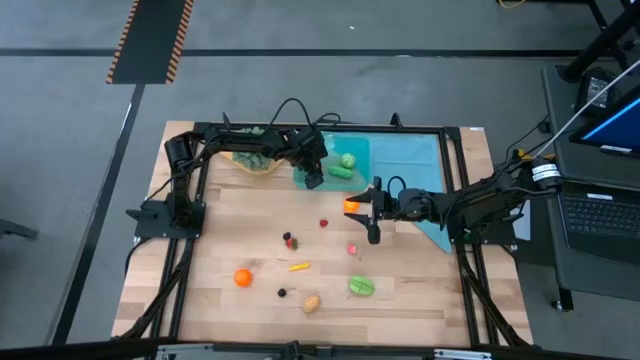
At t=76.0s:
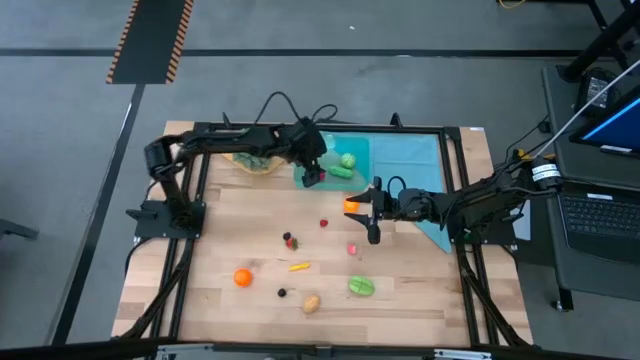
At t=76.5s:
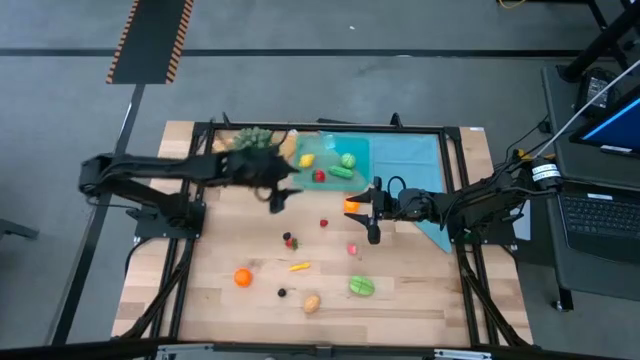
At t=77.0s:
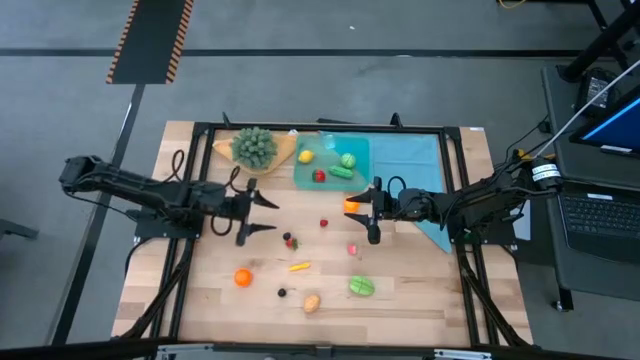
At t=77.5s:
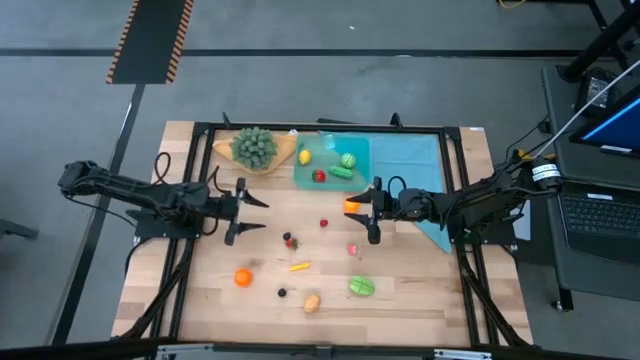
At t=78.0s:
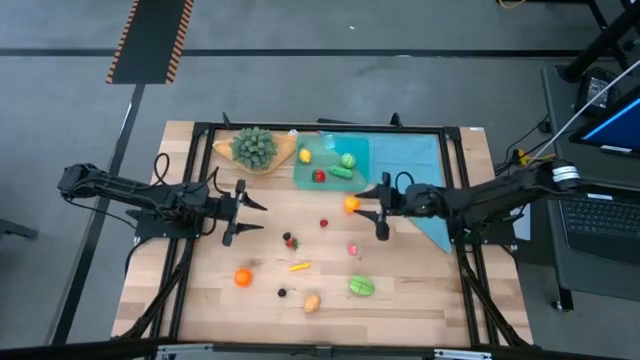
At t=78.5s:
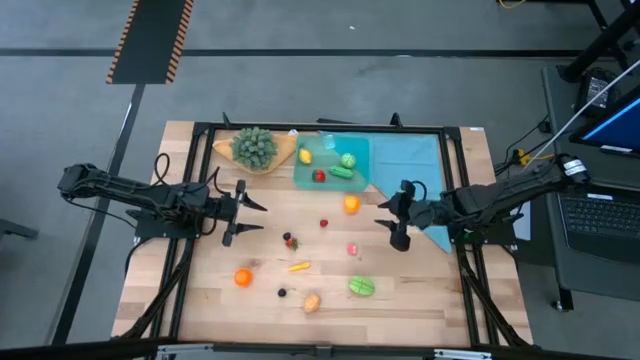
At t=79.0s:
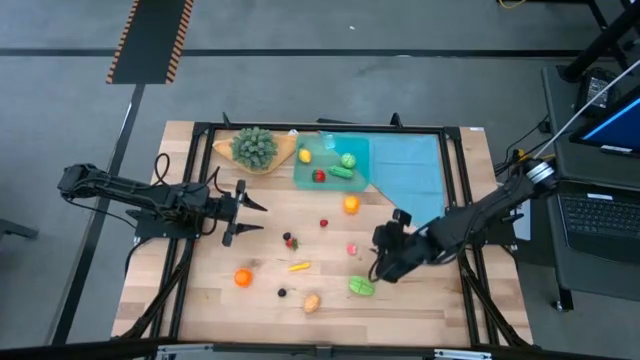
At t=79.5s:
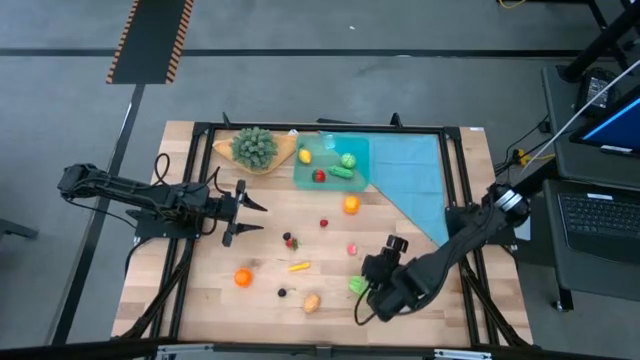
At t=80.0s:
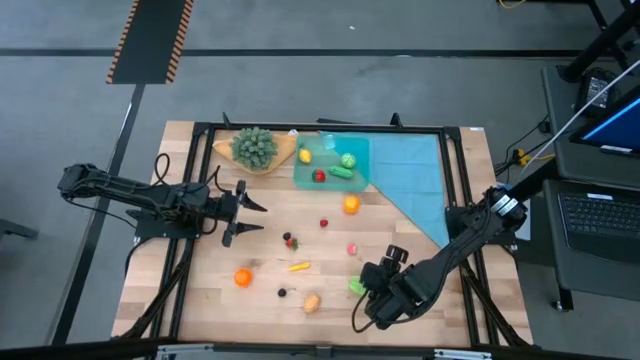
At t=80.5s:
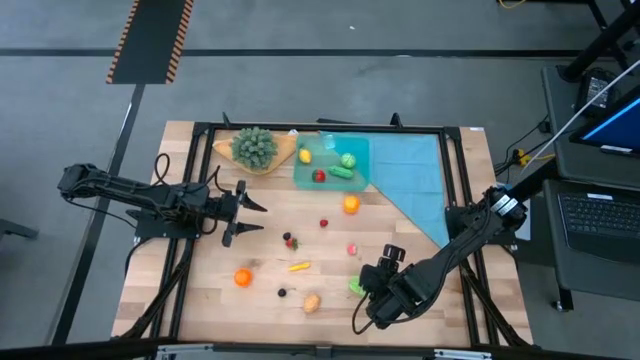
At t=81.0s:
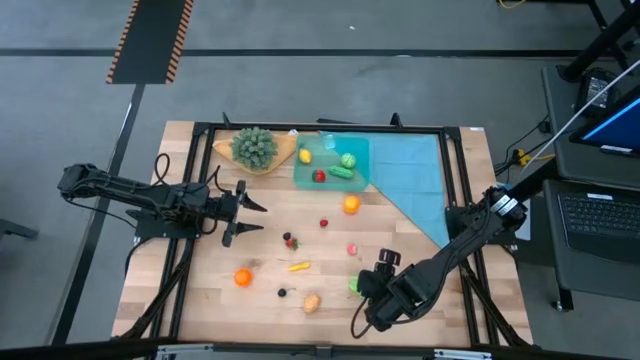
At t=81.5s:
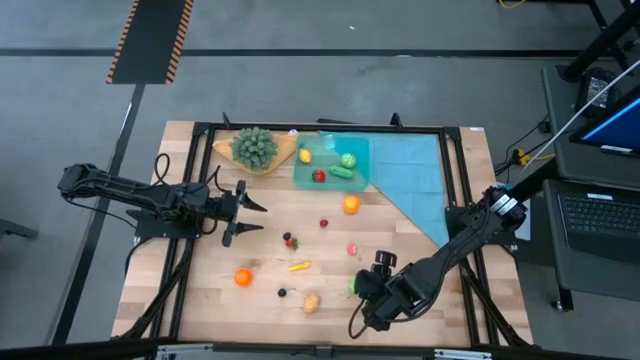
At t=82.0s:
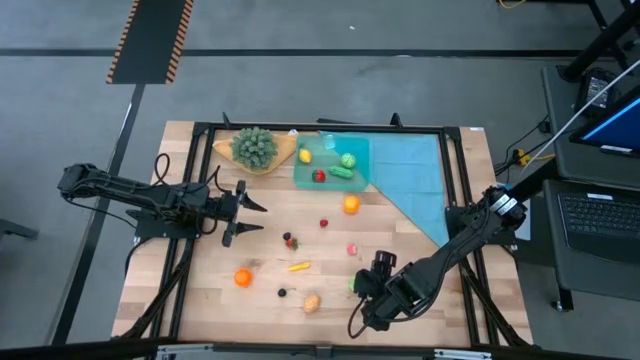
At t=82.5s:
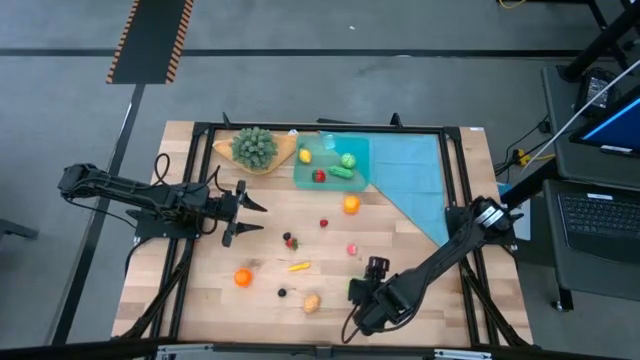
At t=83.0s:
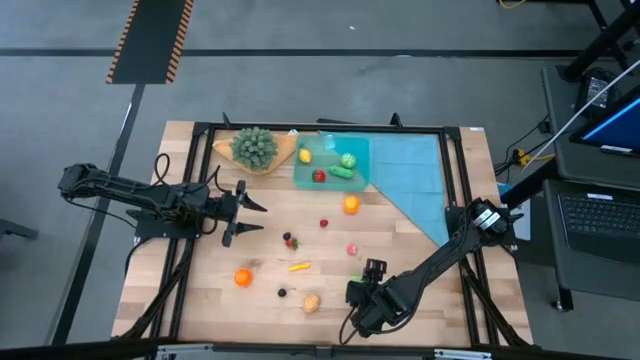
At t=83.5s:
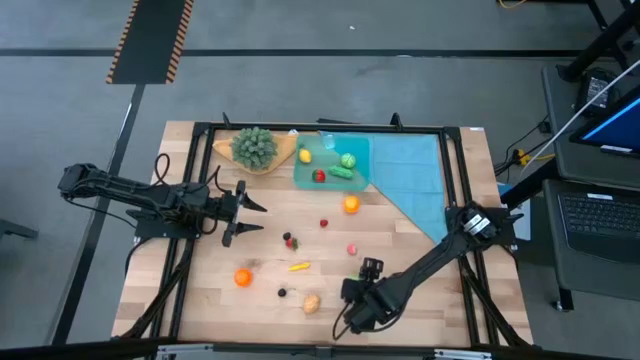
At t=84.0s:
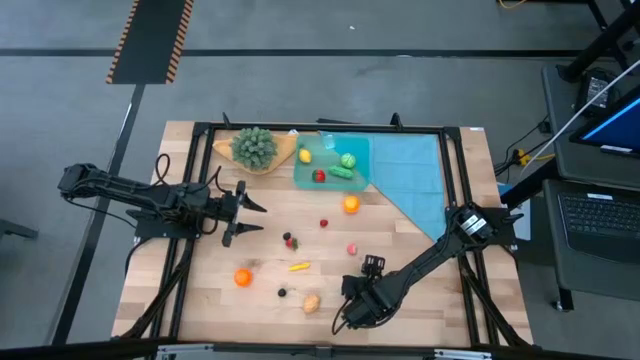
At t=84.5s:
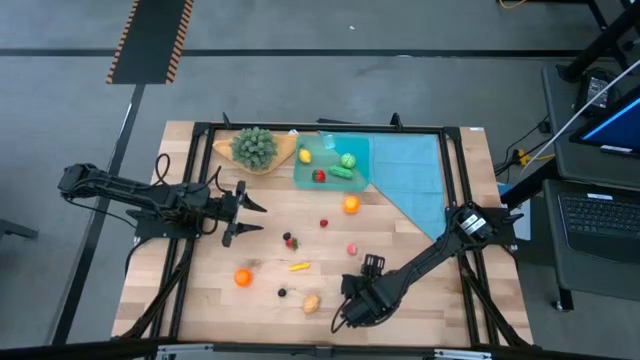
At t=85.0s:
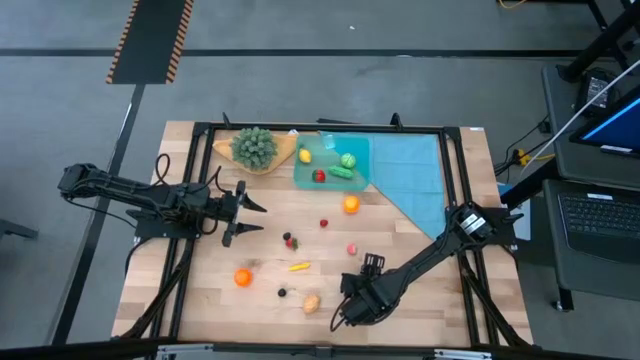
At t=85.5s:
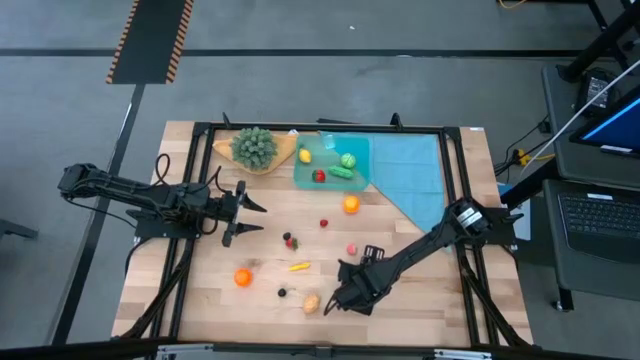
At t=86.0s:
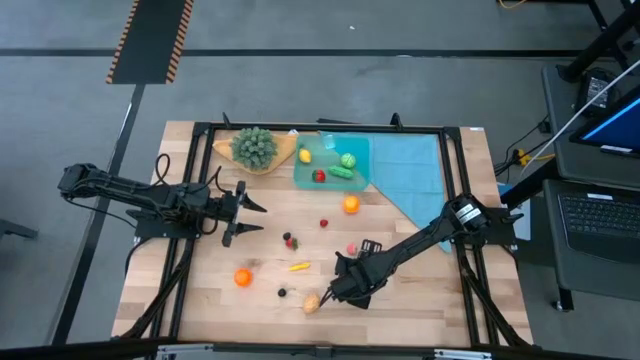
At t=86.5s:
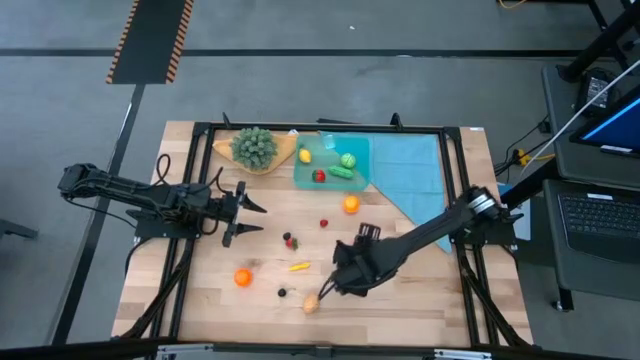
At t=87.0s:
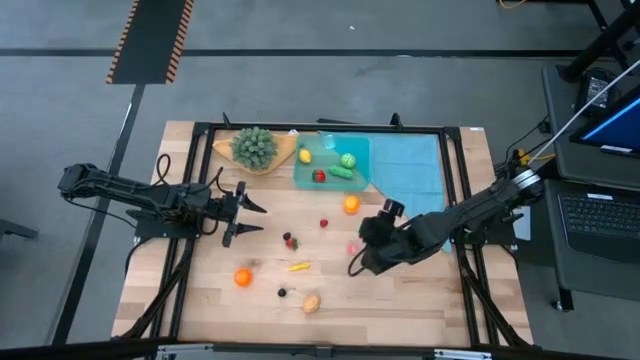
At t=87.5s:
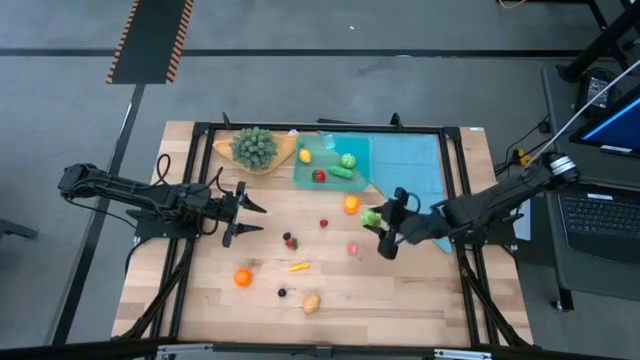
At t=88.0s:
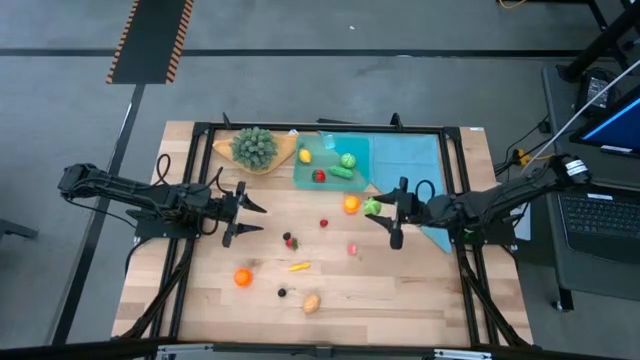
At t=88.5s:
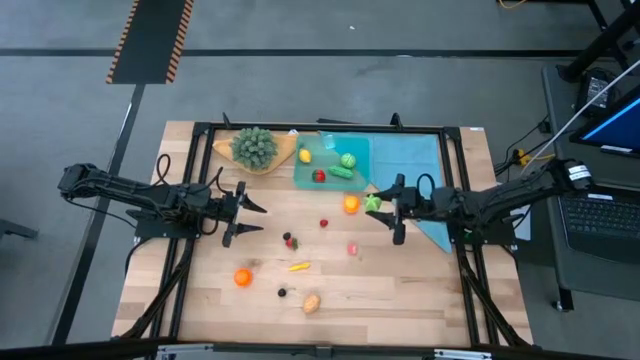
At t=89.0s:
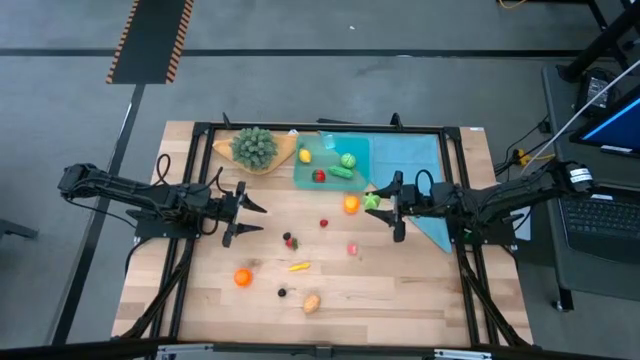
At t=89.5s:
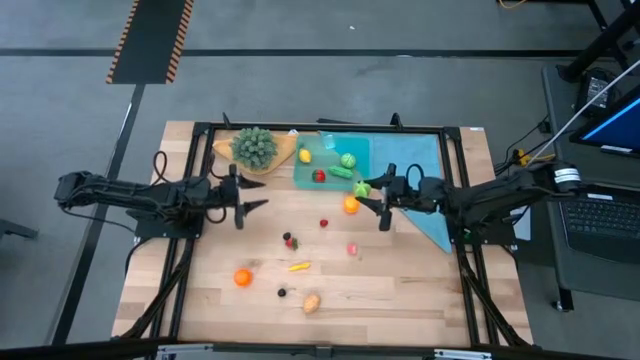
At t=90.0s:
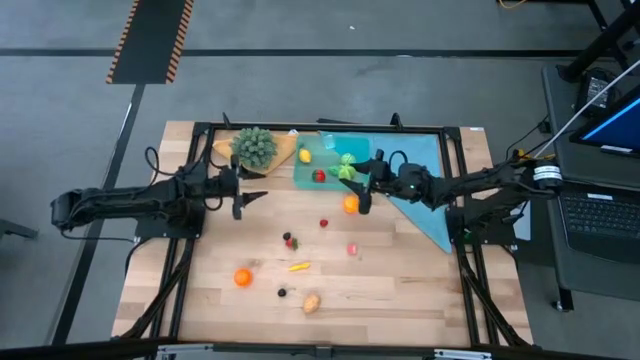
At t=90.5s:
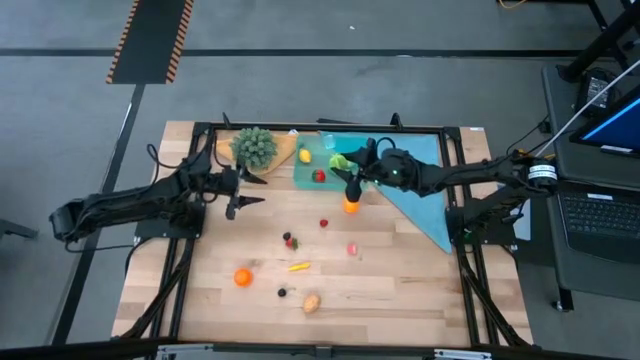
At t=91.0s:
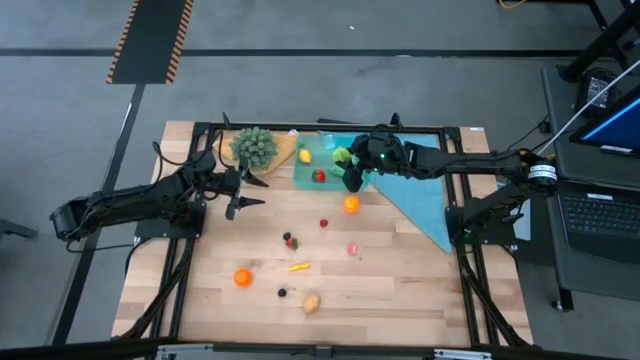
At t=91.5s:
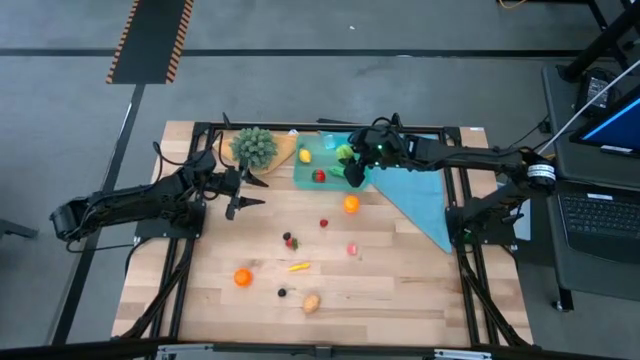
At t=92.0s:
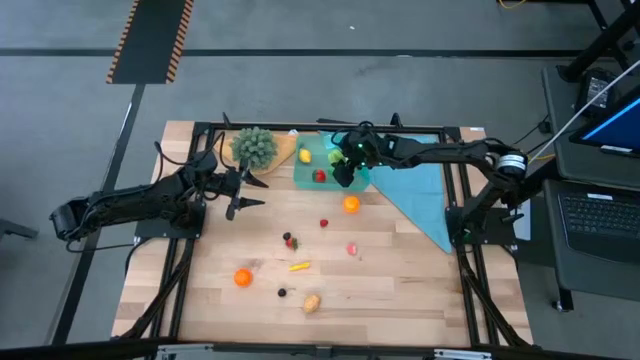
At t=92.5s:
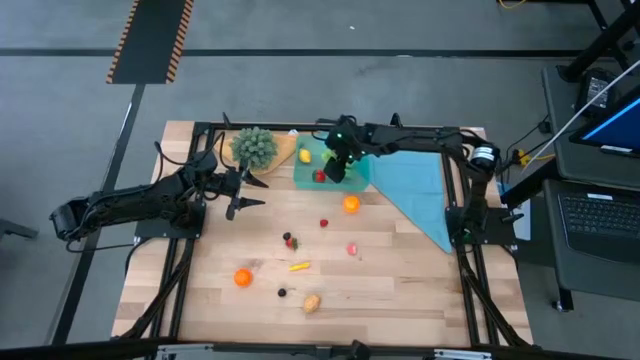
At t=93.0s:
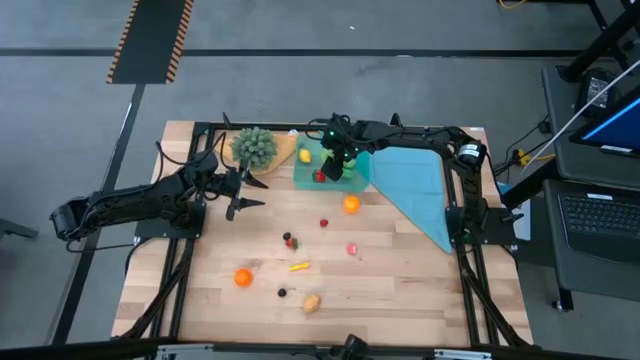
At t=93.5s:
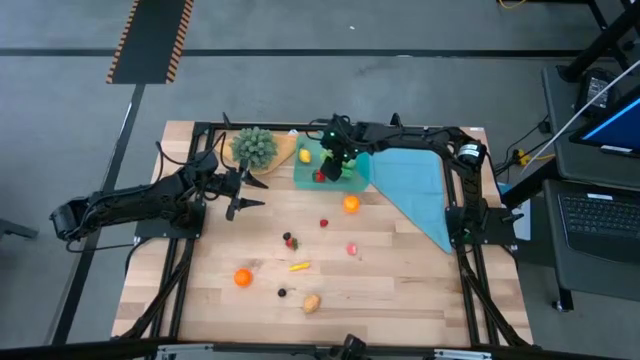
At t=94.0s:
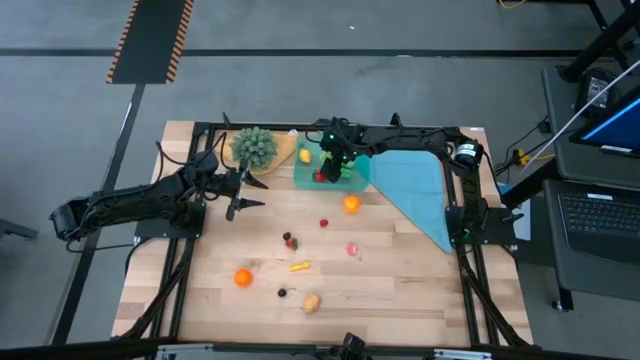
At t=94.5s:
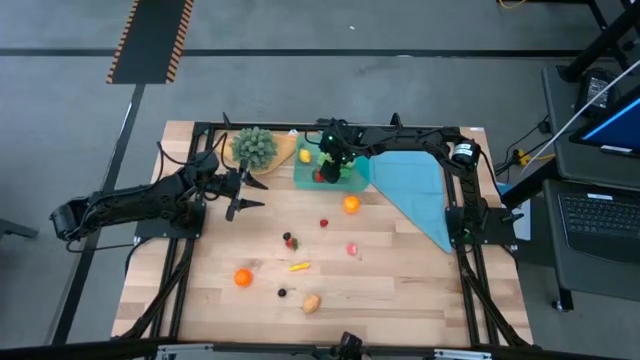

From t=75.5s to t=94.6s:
Task: Pick and placing Produce into tupperware
Put the star fruit into the blue bin
